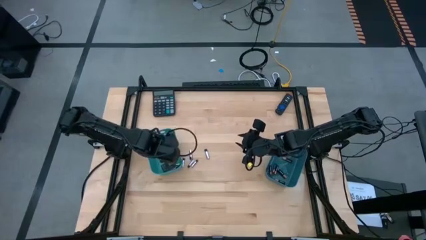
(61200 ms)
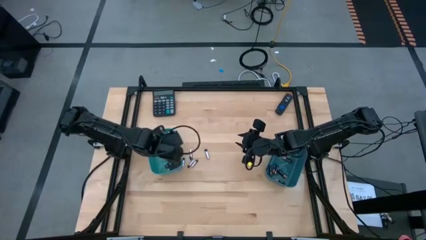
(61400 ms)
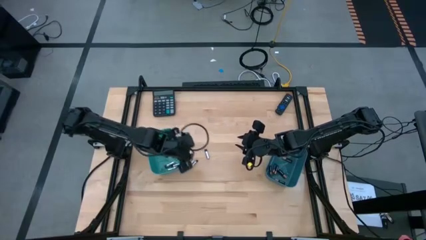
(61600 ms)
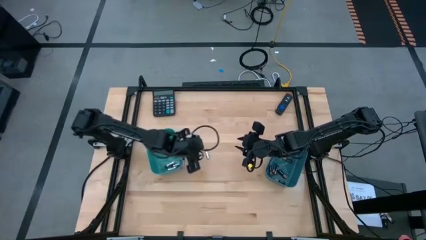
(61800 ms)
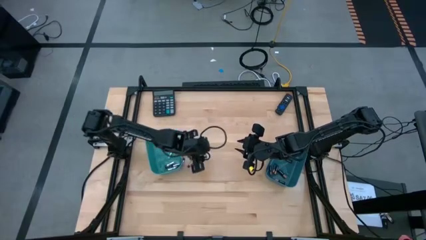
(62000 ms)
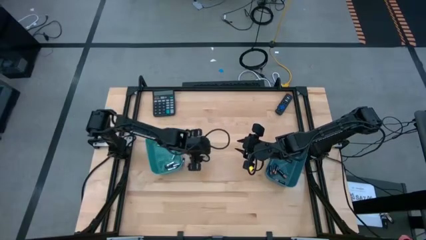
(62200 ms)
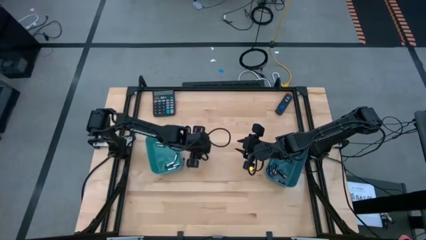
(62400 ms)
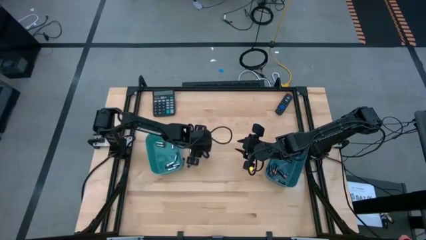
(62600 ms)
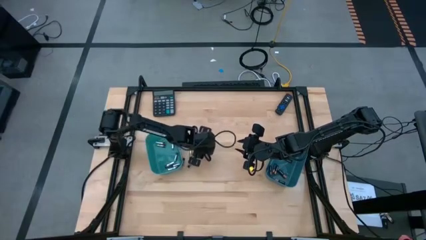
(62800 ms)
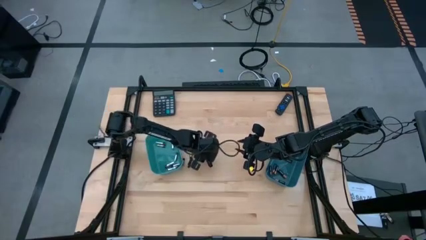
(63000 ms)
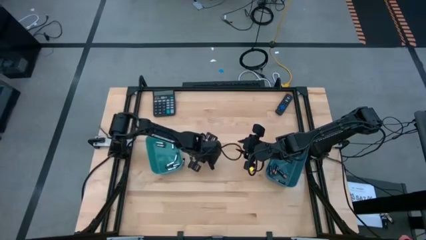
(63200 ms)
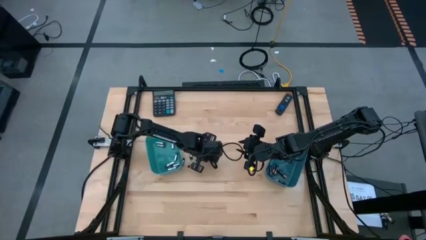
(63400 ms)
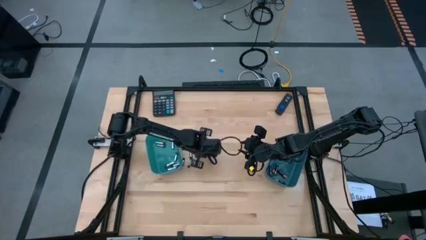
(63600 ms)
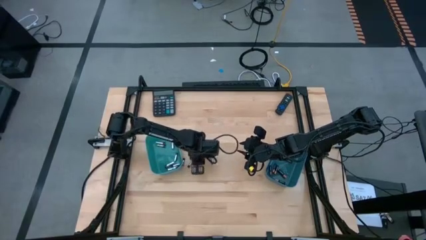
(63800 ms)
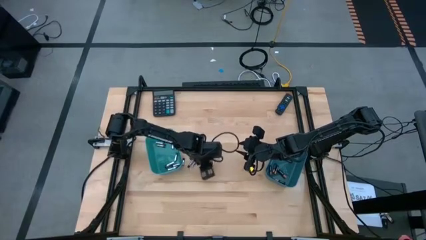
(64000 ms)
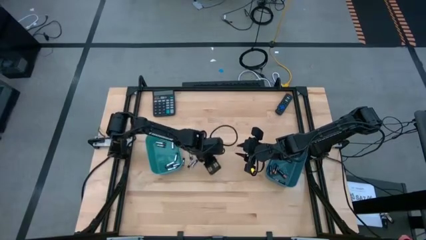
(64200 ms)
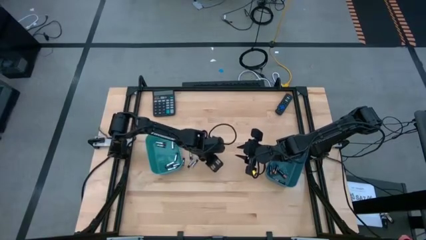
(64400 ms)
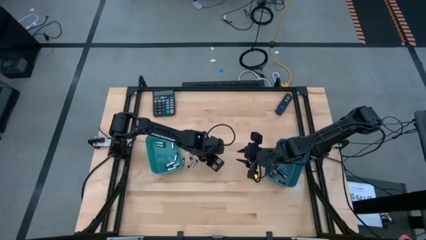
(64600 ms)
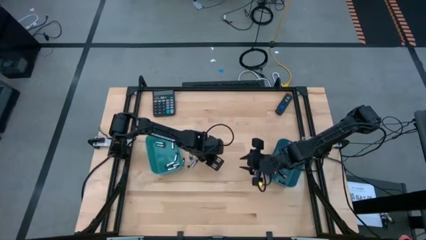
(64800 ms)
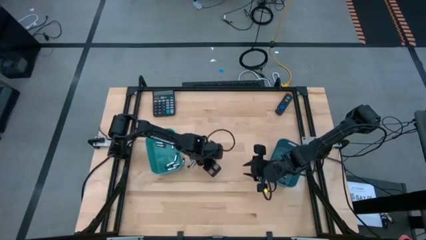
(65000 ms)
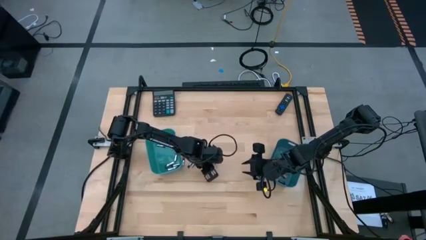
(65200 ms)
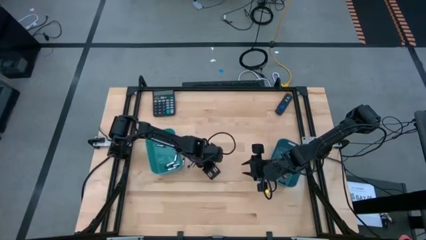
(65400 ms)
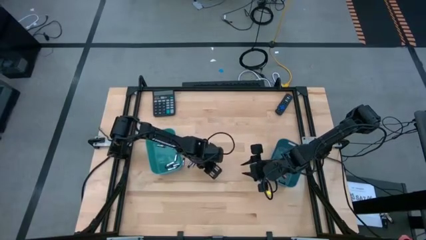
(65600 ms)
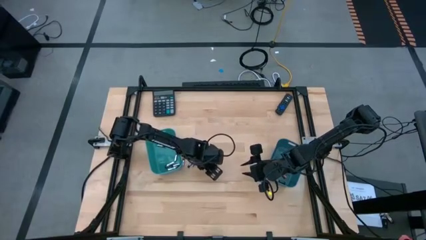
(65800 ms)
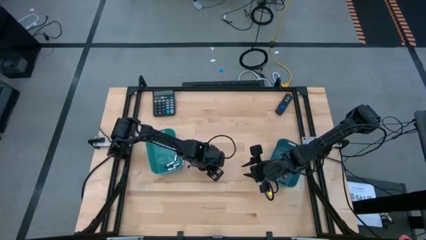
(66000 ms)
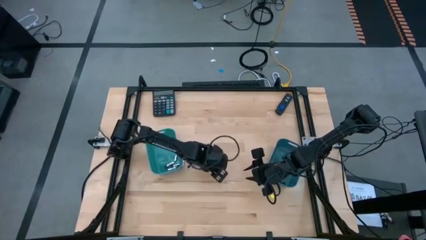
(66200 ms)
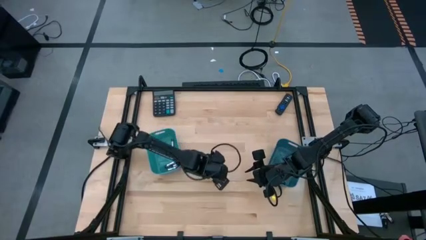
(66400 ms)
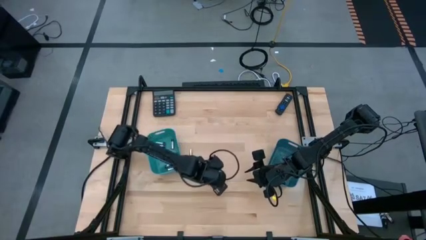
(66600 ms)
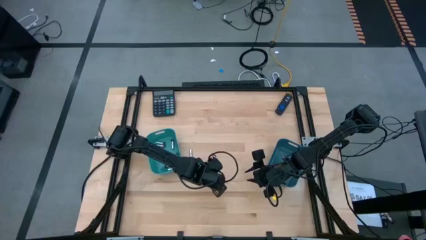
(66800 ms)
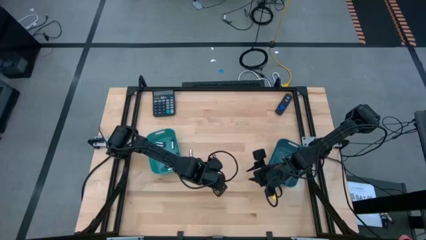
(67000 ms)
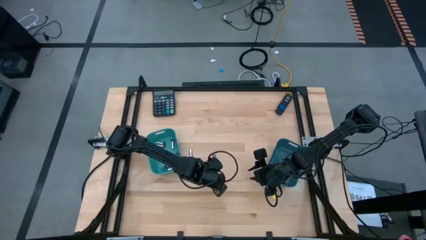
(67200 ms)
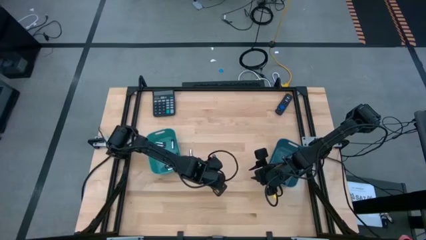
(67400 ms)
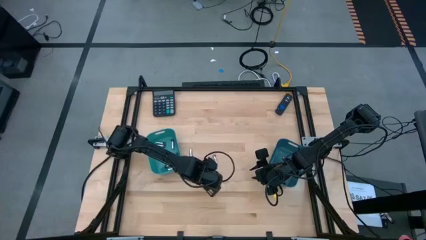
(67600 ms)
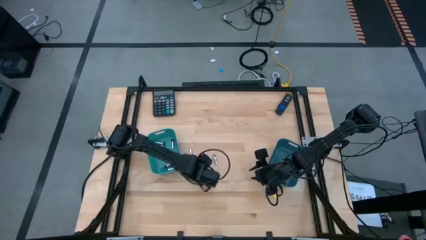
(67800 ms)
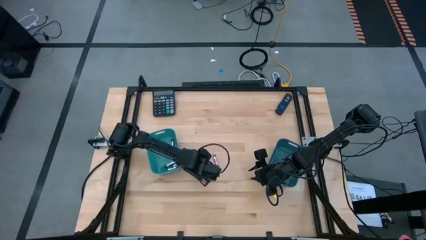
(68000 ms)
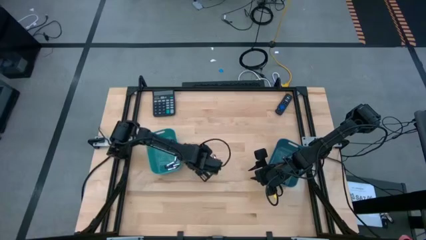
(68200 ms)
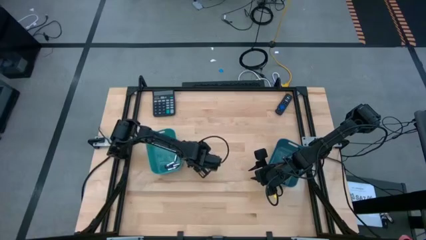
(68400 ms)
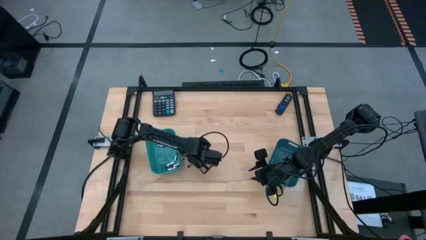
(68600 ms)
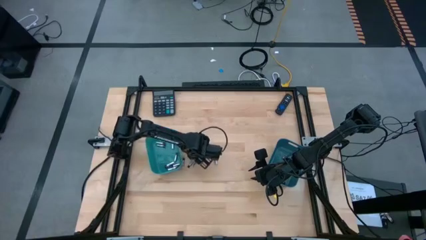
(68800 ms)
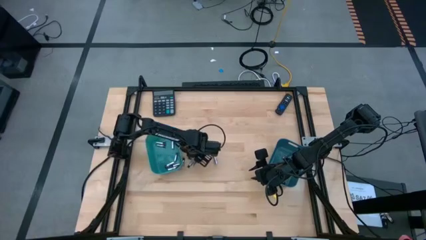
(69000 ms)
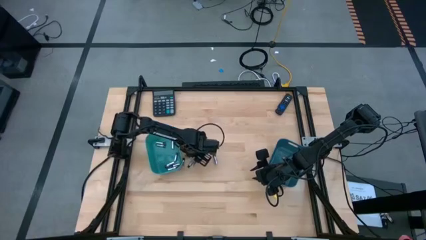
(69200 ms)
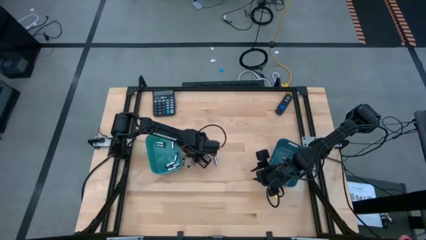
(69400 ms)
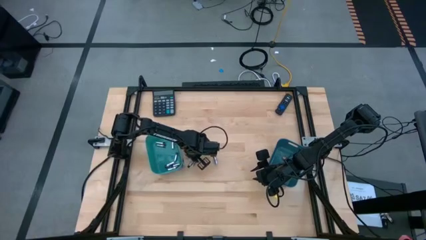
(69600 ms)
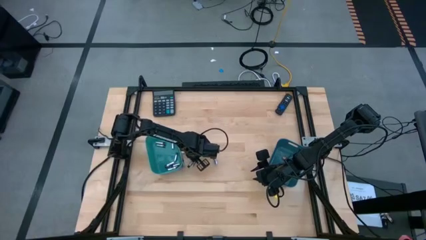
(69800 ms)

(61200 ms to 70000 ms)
Task: Sort batteries
Put the white battery into the left blue bin

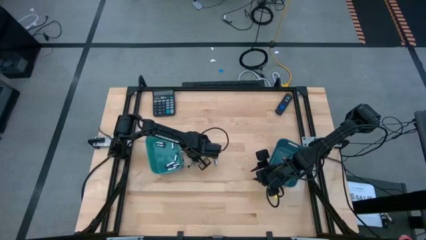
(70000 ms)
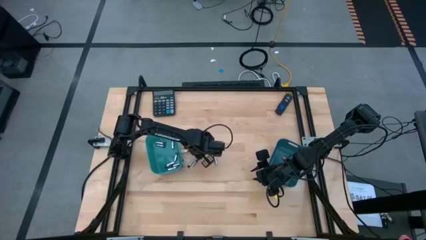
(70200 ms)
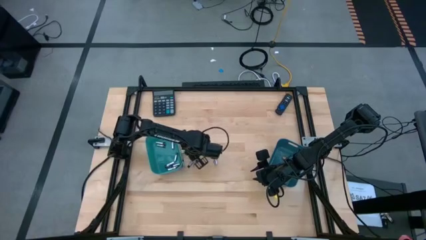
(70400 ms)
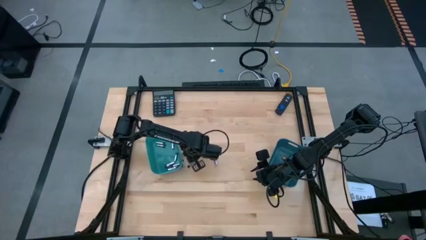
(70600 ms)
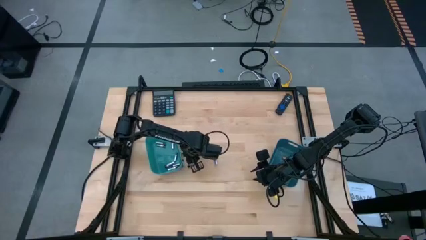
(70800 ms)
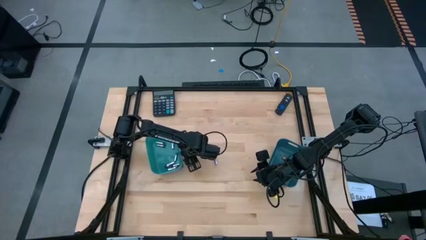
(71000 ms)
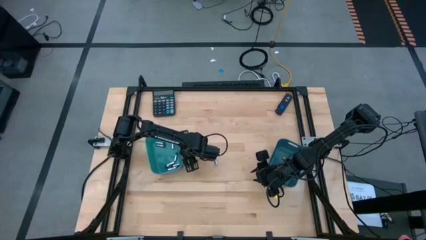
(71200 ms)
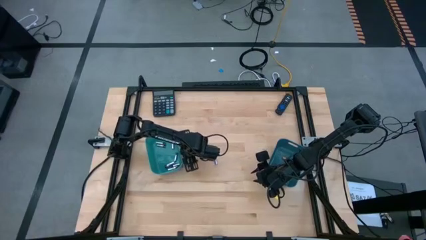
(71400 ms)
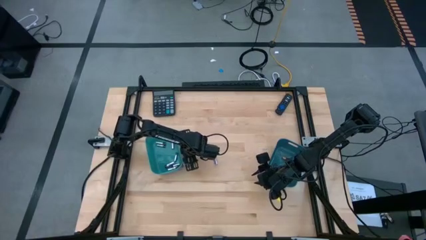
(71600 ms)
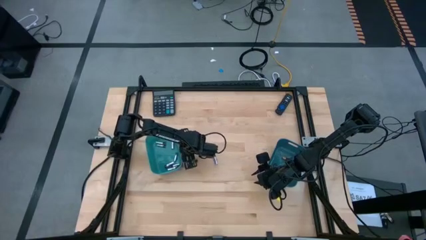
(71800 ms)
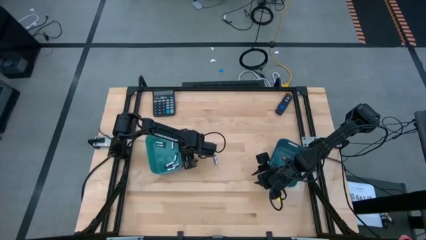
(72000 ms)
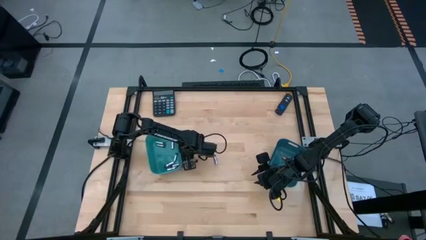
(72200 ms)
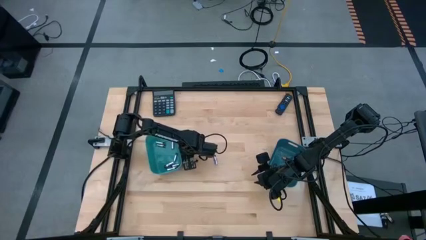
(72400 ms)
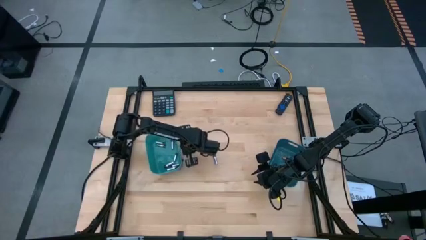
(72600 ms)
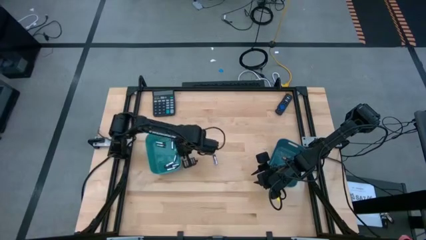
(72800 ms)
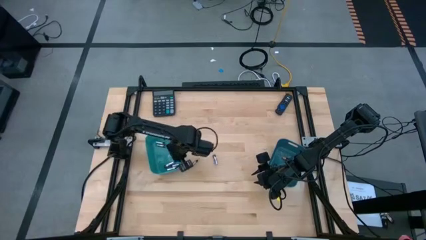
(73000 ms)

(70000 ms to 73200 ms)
Put the white battery into the left blue bin

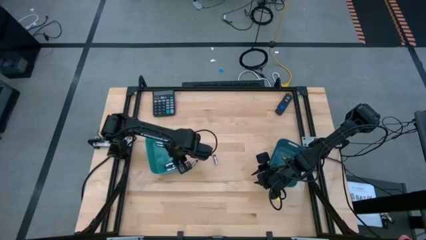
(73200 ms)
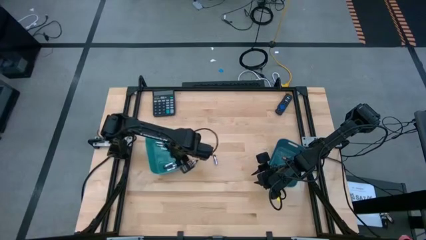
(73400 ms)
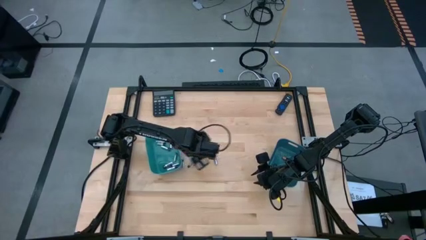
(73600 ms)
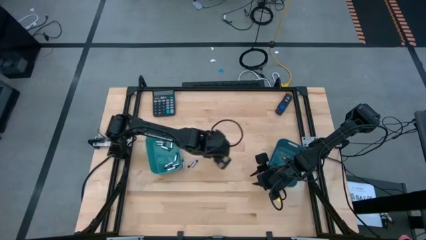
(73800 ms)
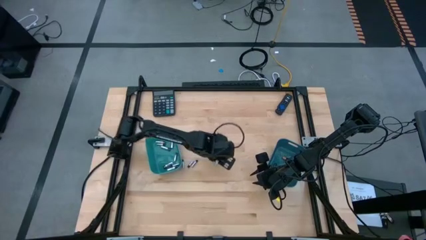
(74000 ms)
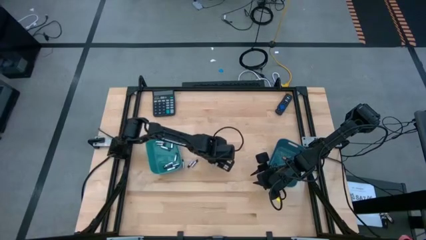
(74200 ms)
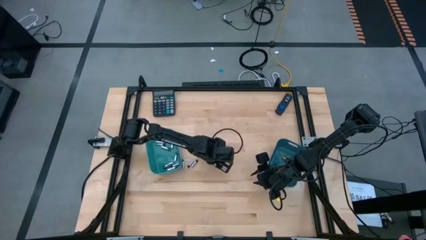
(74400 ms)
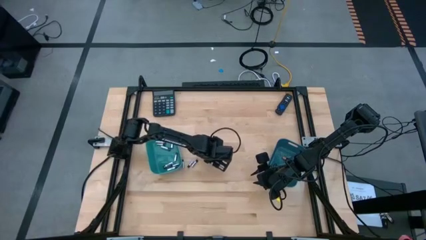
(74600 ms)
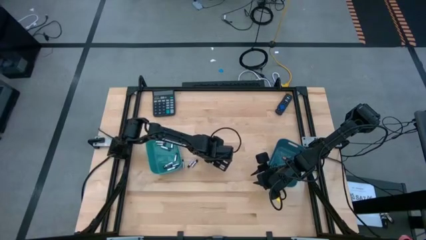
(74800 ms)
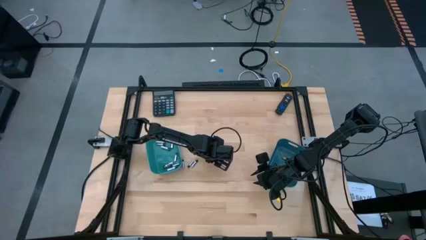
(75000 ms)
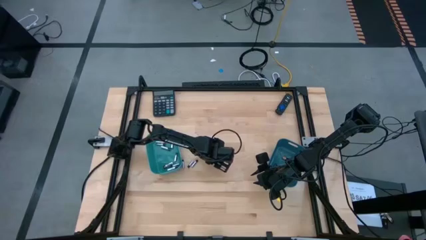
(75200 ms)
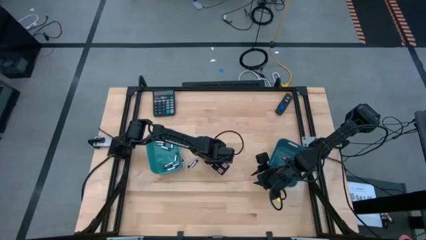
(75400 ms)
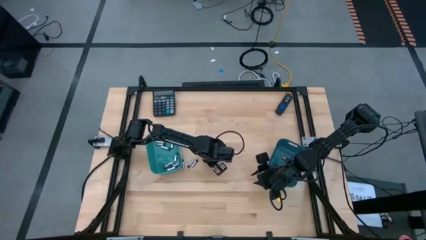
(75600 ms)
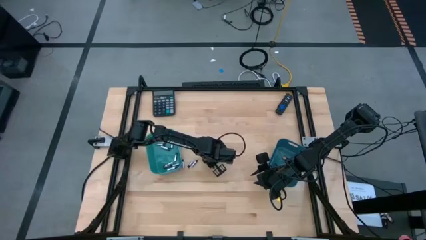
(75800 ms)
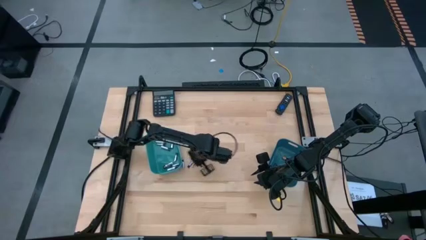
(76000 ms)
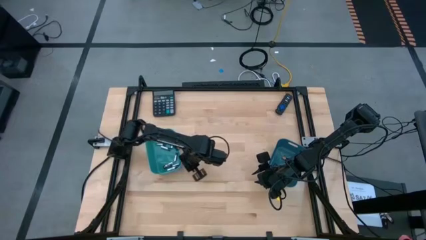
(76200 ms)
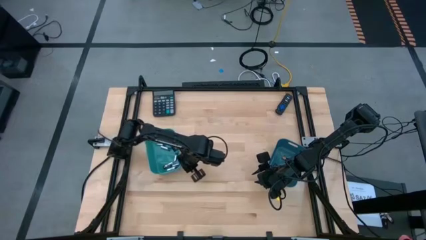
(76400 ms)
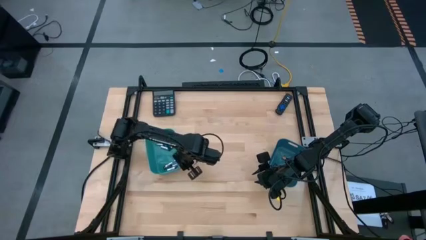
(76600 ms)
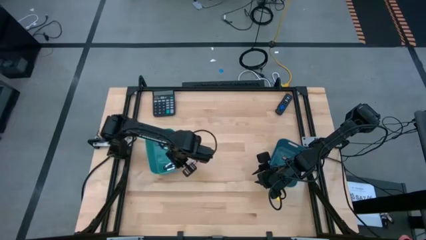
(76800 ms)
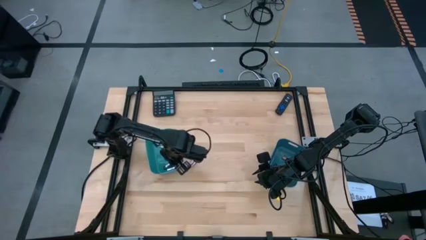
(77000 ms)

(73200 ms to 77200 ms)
Put the white battery into the left blue bin

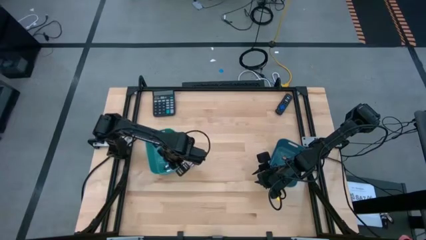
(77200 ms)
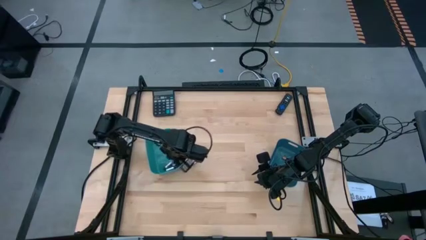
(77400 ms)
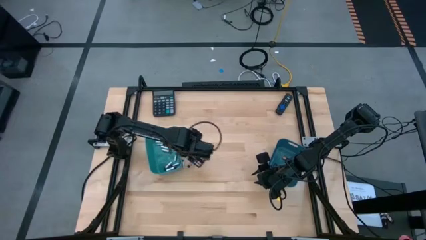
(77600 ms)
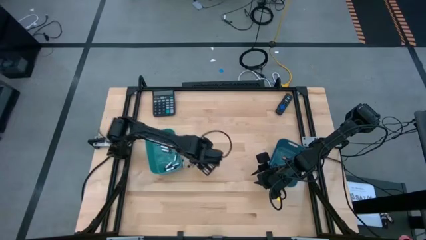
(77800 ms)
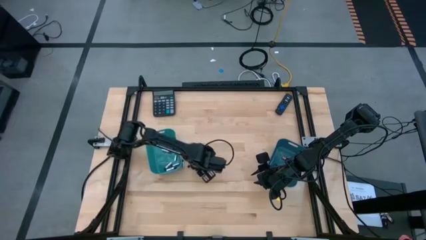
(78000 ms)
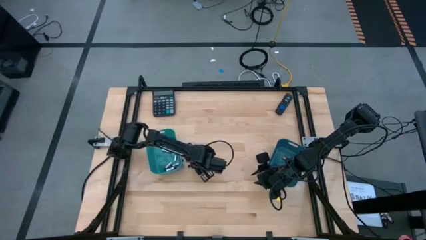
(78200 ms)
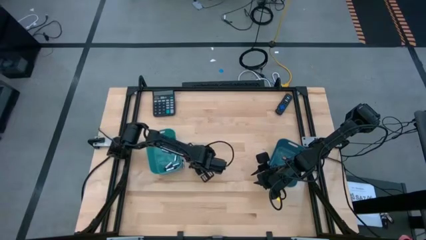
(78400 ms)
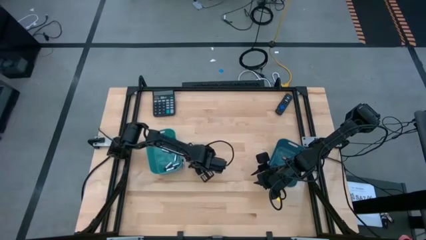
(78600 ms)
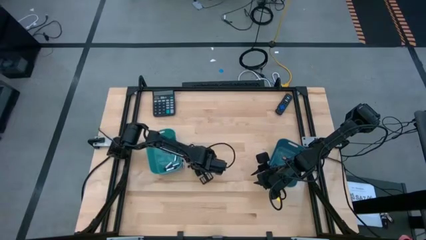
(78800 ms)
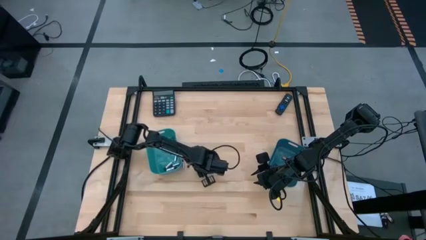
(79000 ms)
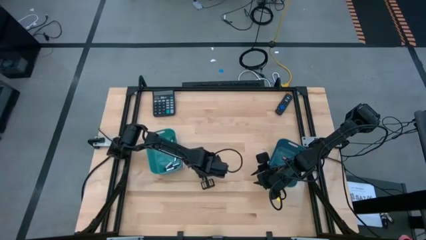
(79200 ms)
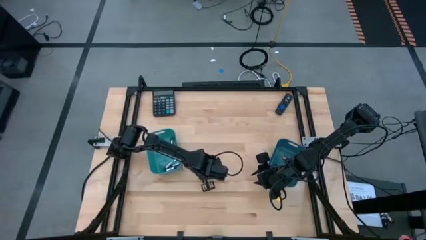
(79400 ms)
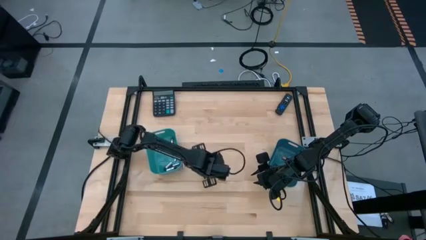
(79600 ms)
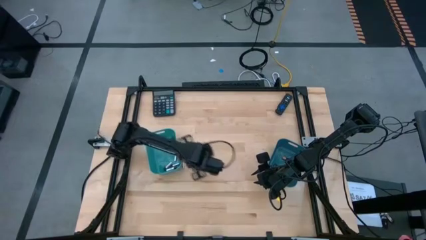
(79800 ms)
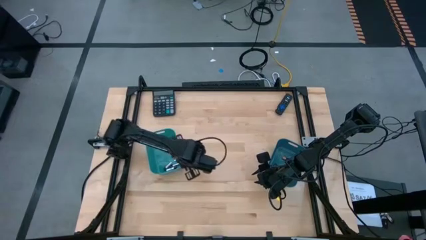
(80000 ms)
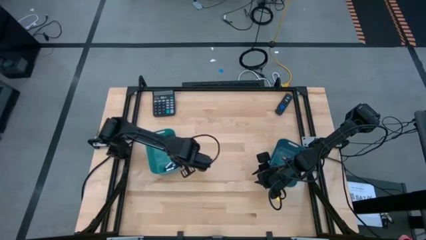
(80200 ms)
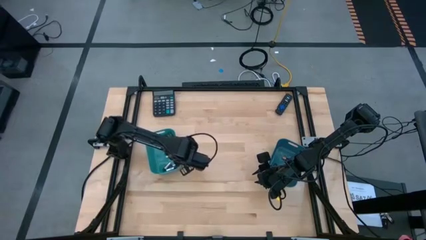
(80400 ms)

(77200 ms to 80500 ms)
Put the white battery into the left blue bin
